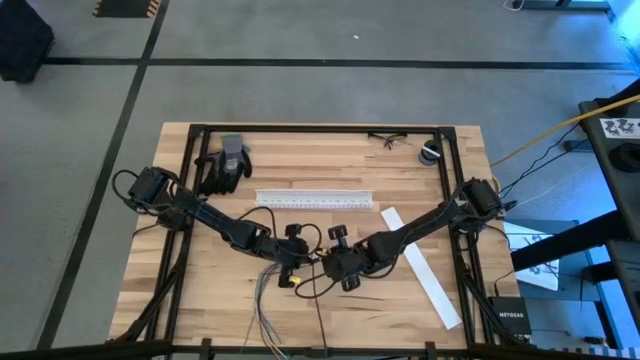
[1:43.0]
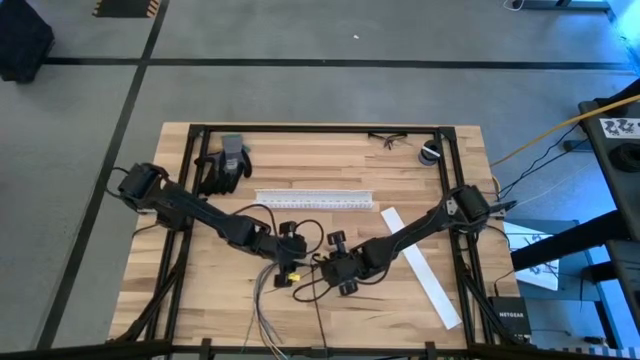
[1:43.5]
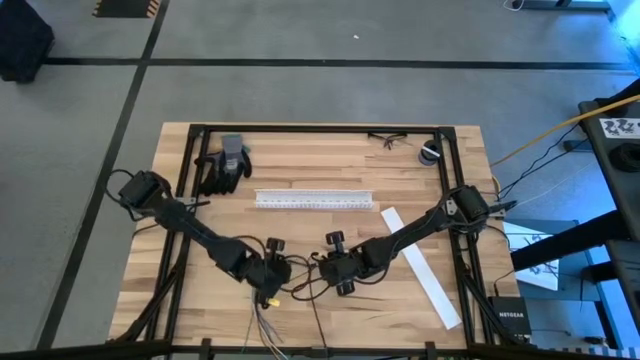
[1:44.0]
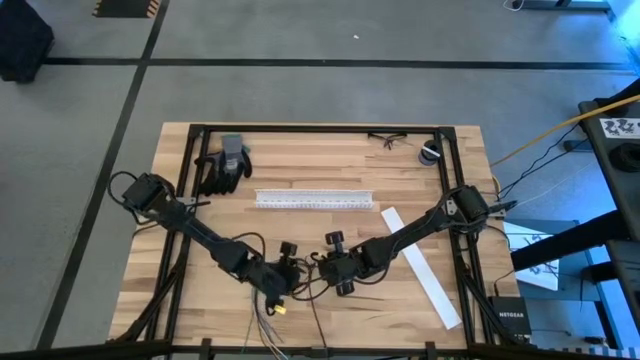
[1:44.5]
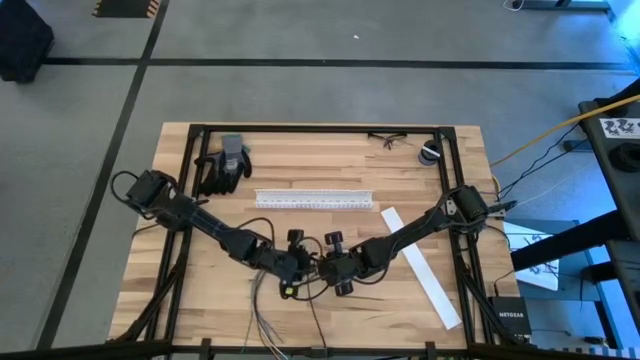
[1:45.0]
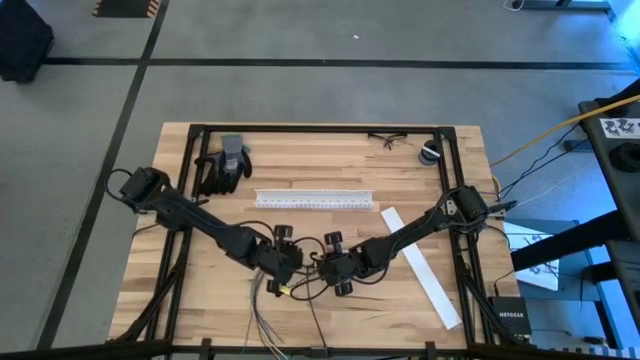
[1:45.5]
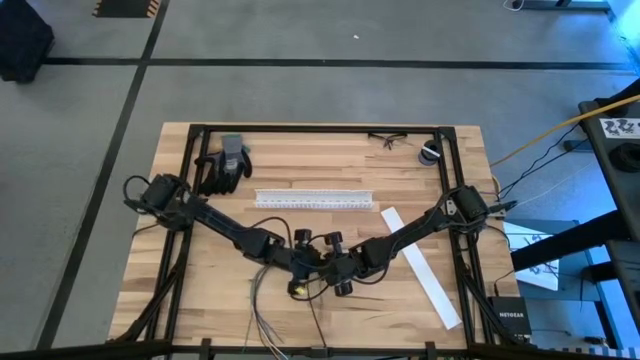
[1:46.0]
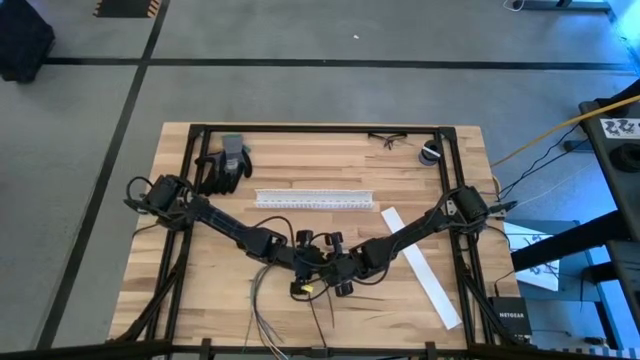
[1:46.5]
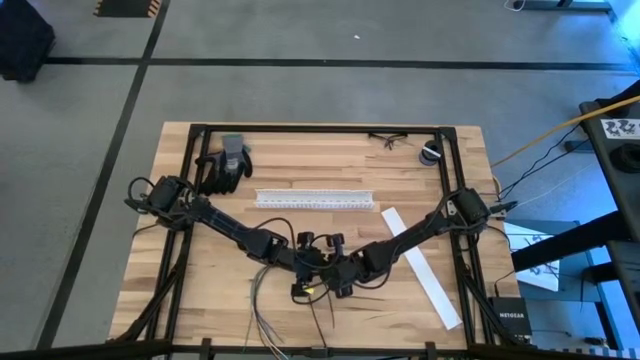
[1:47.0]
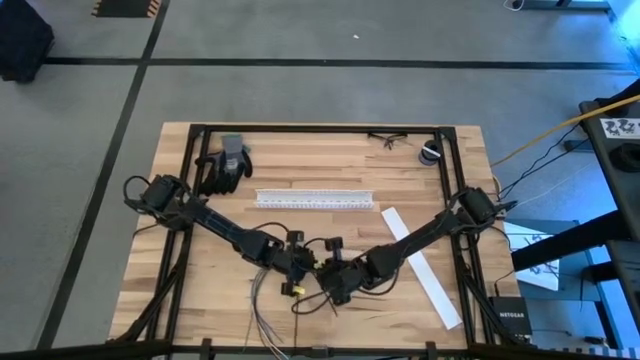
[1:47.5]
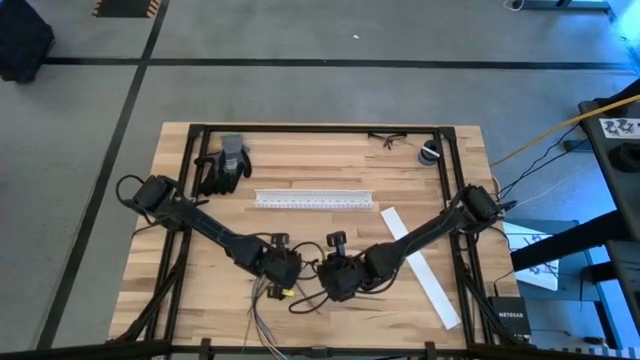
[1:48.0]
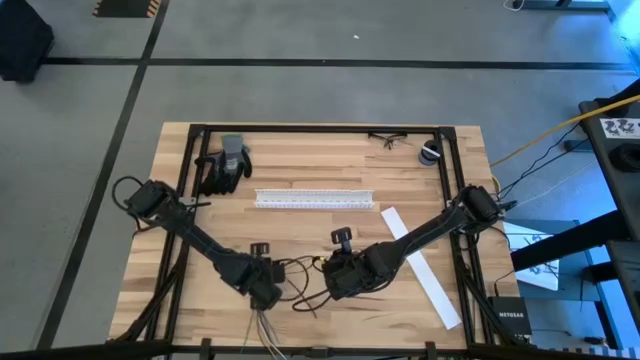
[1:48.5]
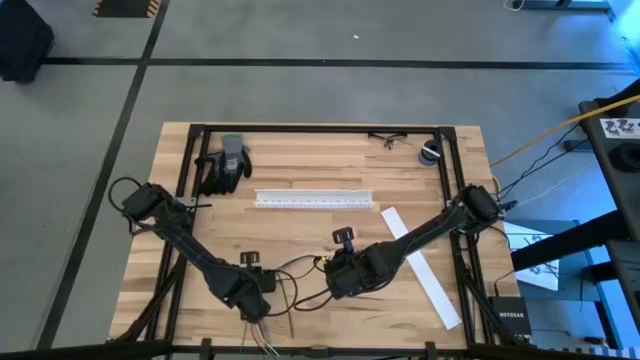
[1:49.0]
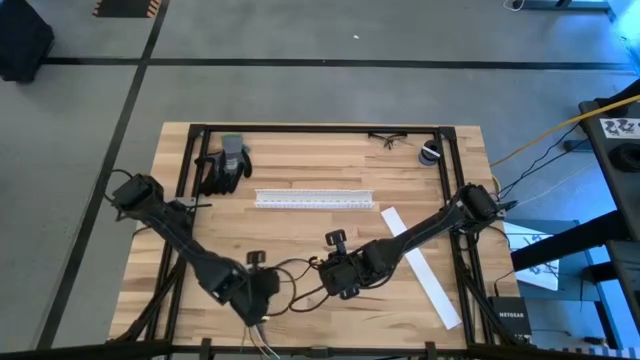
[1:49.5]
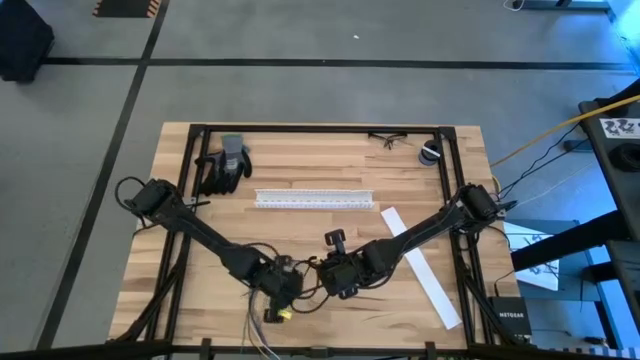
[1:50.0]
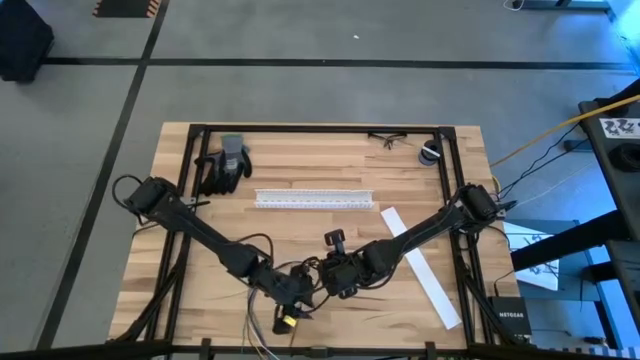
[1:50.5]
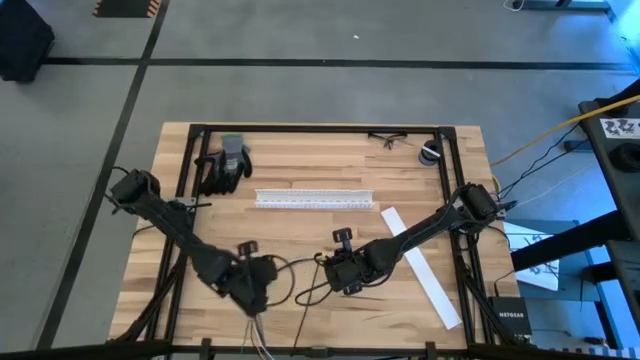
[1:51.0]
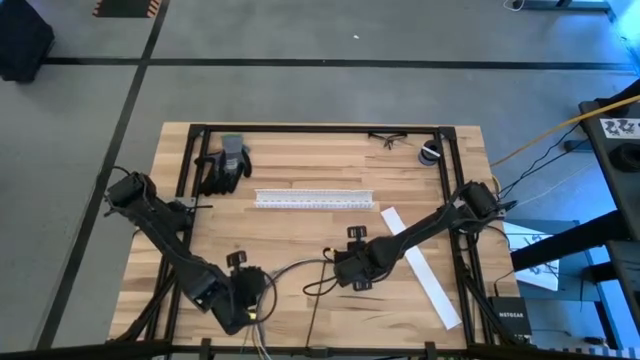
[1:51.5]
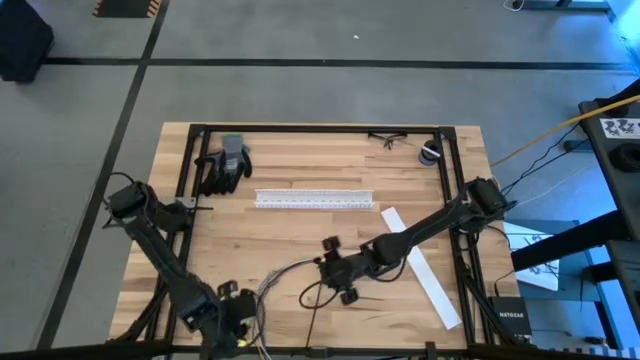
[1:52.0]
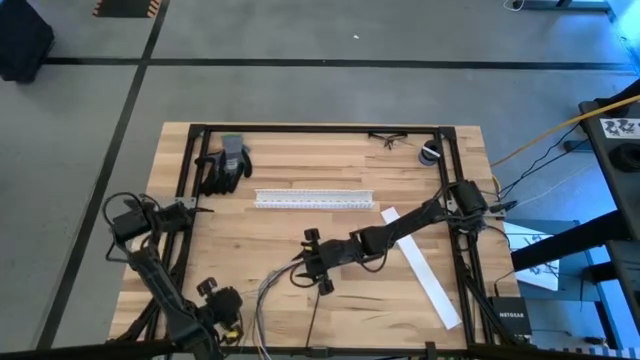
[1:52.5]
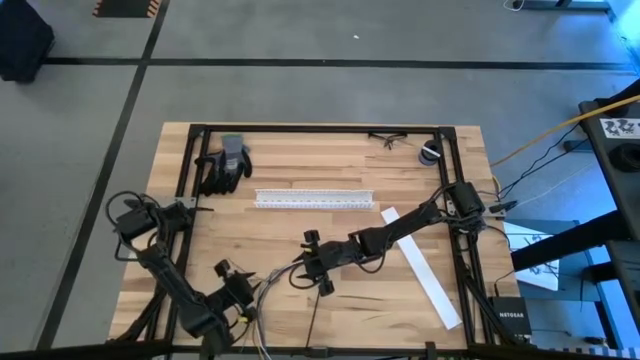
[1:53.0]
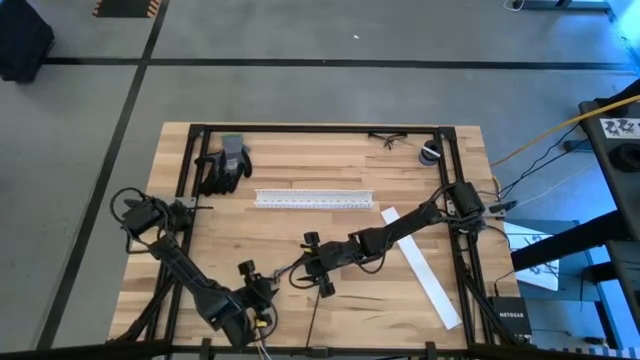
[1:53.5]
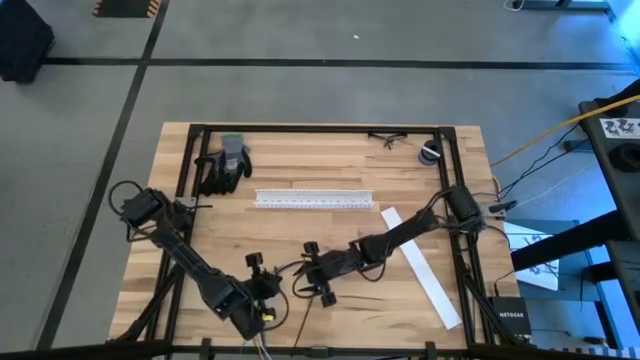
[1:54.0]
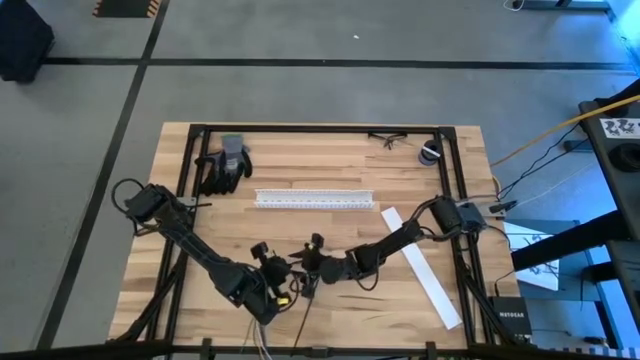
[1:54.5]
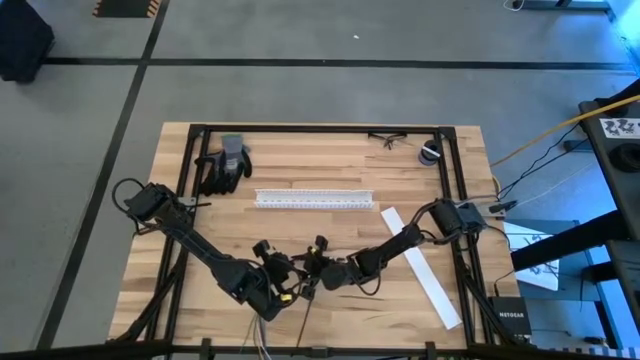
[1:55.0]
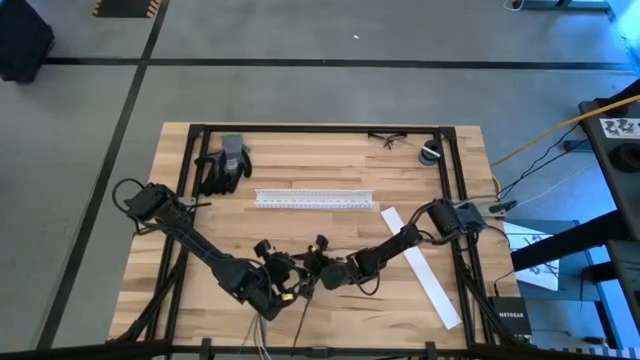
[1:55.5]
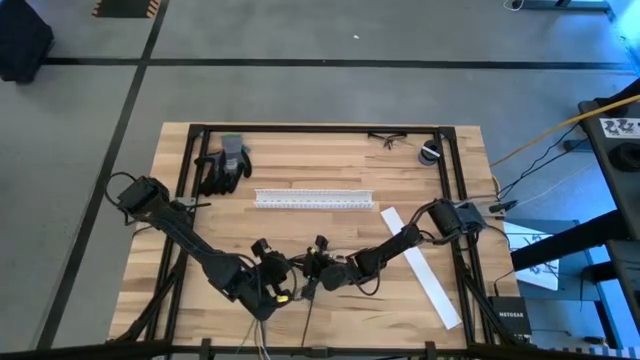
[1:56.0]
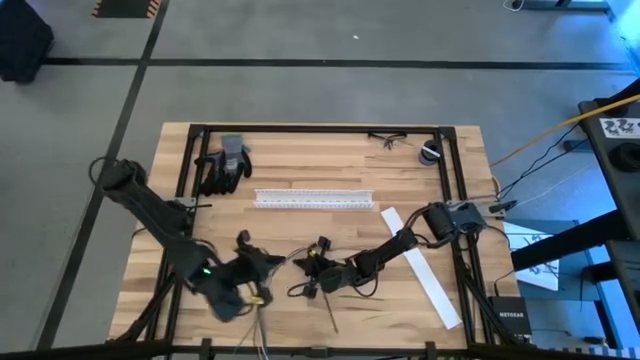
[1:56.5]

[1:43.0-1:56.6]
Task: Ziptie cables
Wrap the cables together using a black ziptie

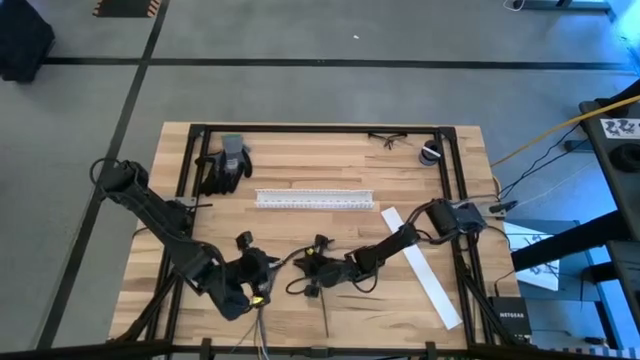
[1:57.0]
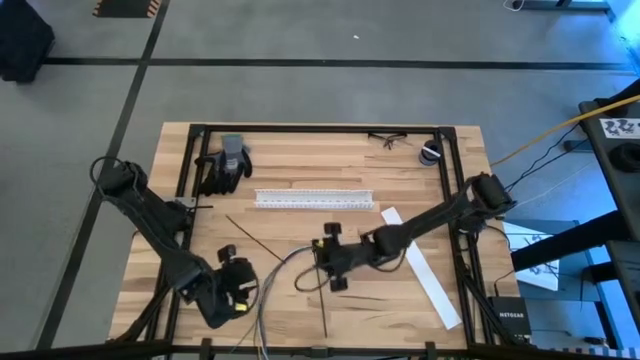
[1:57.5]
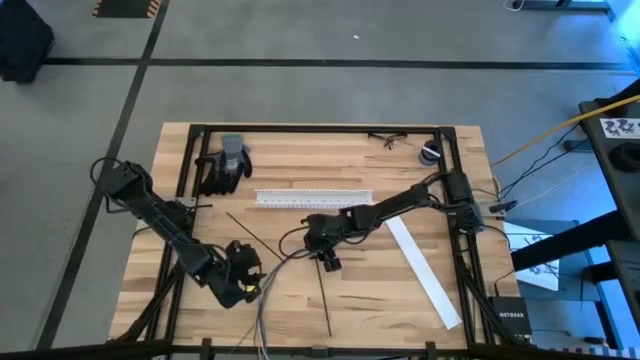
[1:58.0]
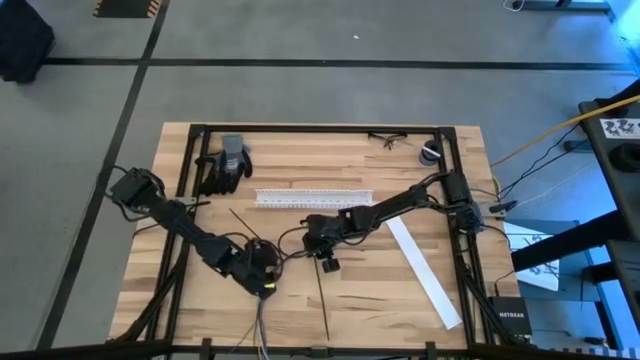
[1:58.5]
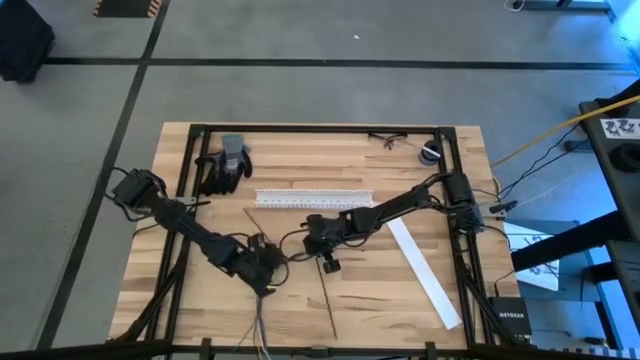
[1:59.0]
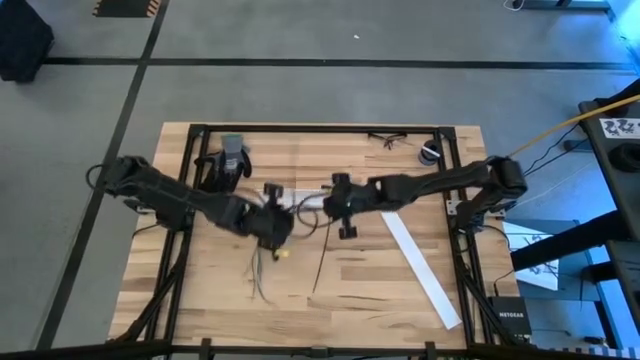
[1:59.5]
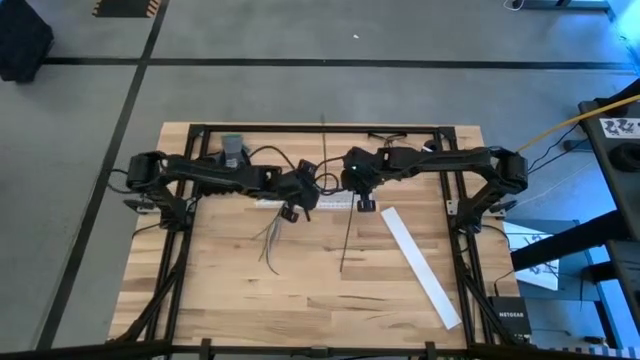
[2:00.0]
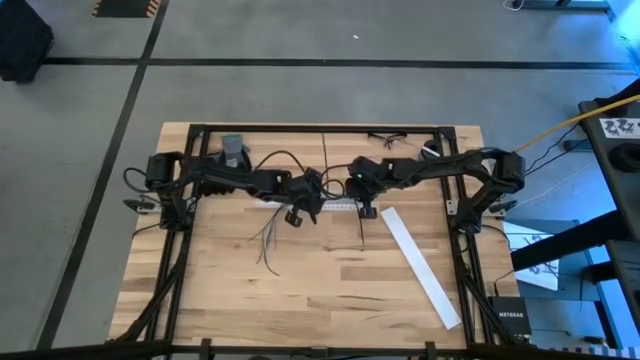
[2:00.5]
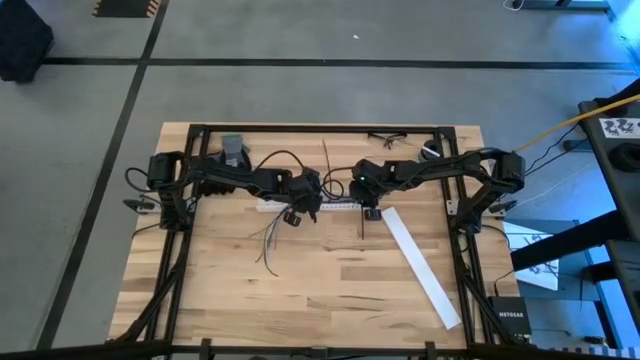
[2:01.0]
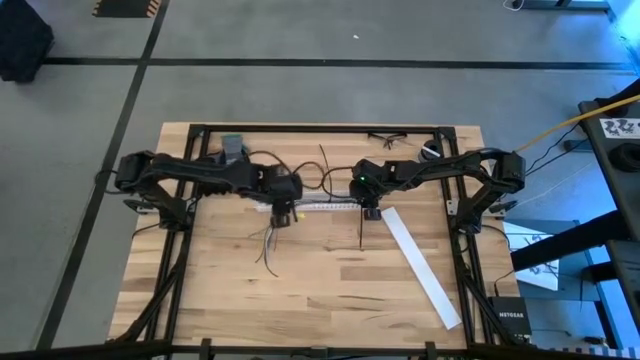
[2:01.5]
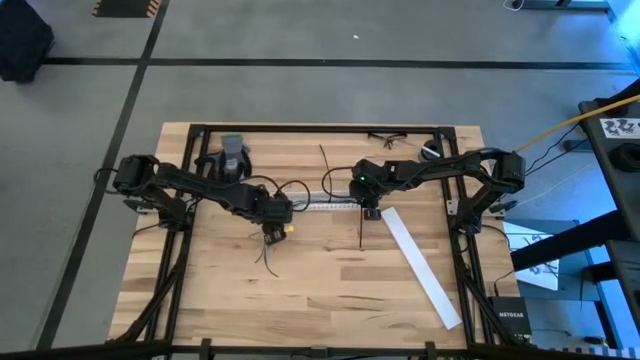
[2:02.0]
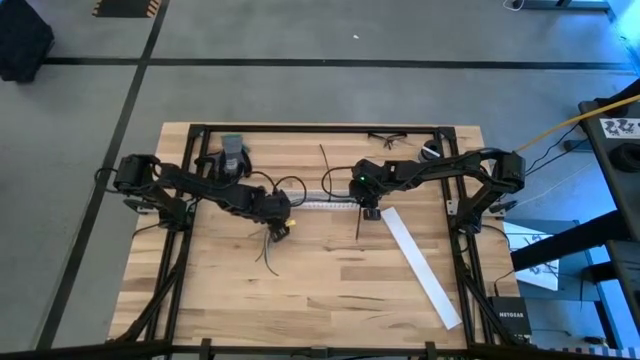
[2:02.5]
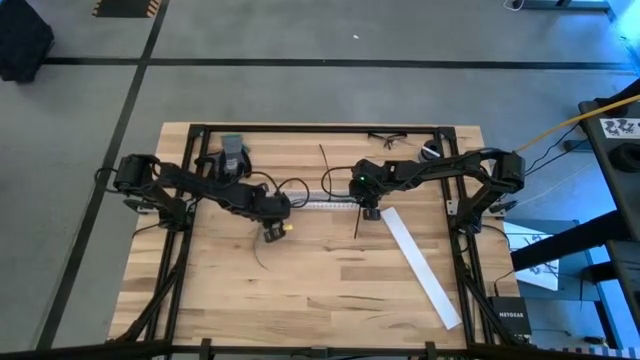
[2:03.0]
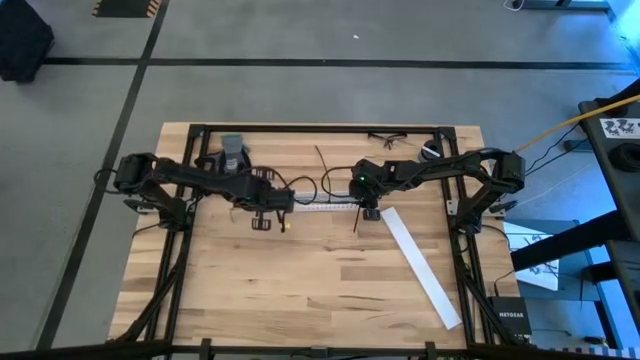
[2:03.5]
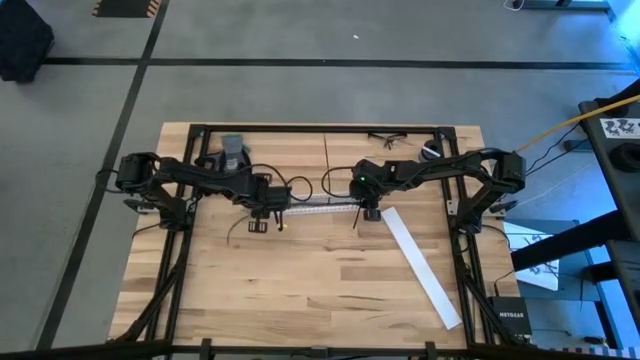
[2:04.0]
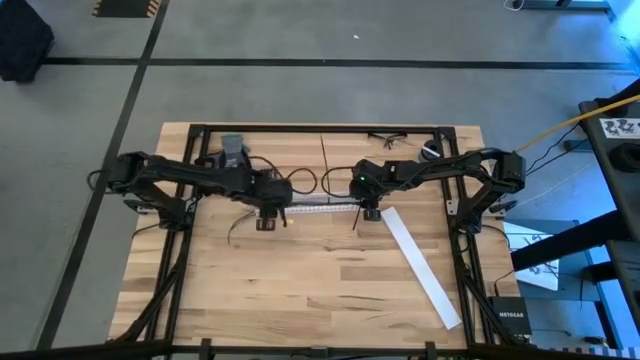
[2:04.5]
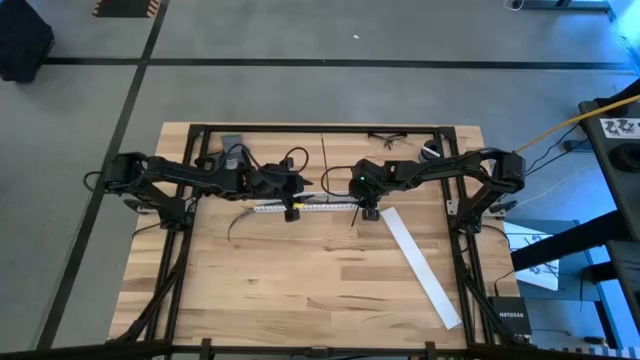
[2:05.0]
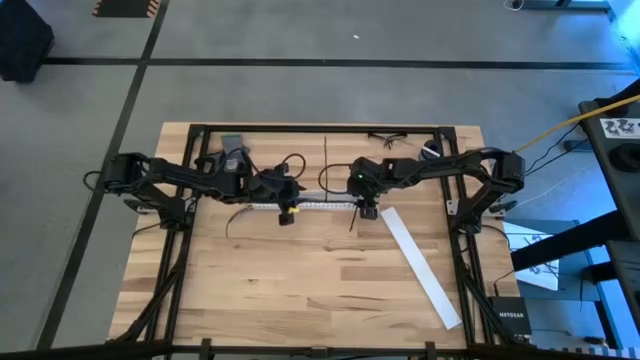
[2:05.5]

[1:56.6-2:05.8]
Put the cable wires into the white cable duct
